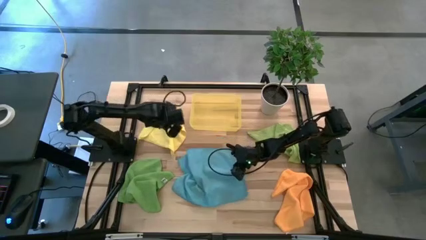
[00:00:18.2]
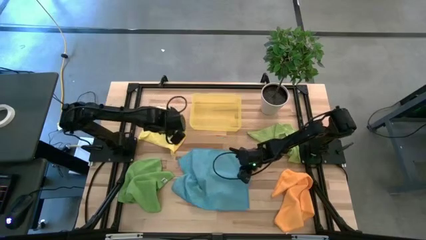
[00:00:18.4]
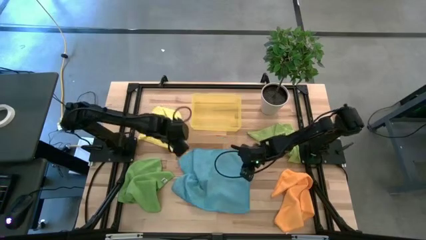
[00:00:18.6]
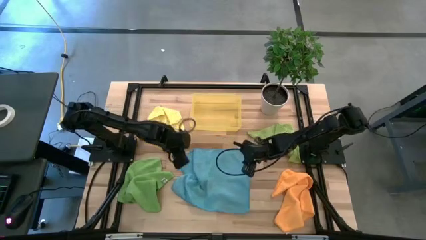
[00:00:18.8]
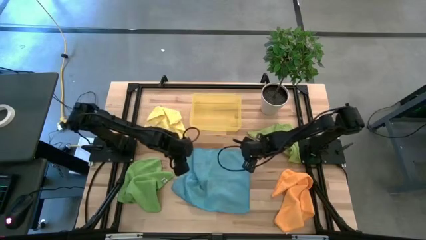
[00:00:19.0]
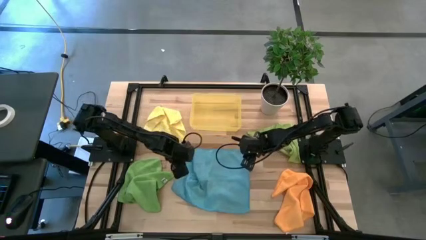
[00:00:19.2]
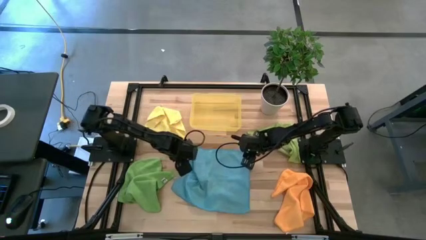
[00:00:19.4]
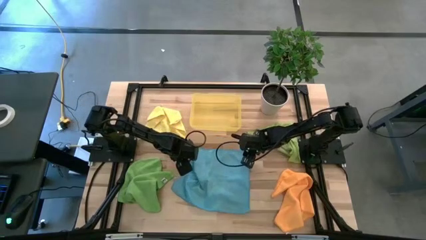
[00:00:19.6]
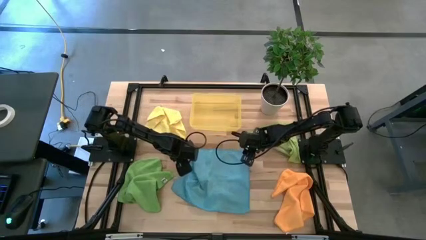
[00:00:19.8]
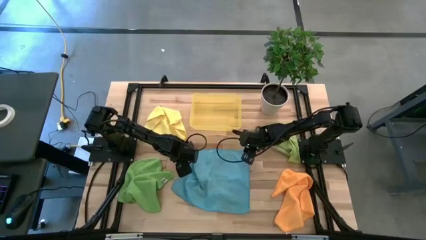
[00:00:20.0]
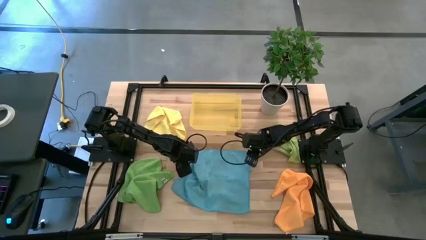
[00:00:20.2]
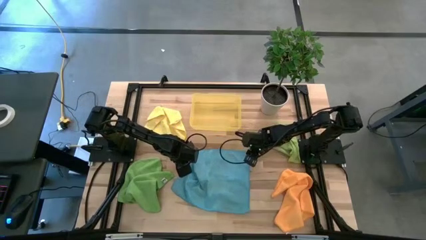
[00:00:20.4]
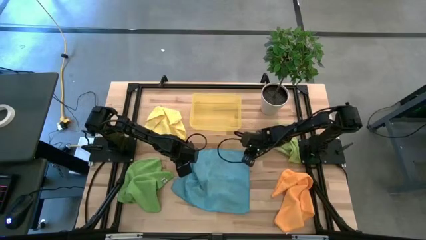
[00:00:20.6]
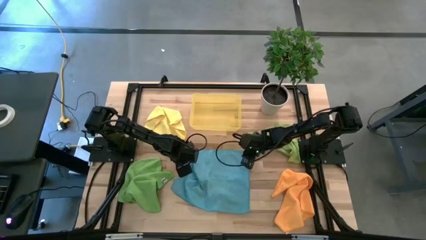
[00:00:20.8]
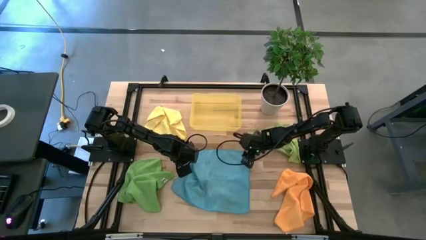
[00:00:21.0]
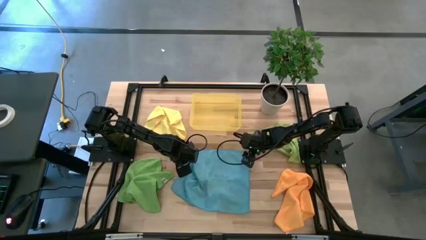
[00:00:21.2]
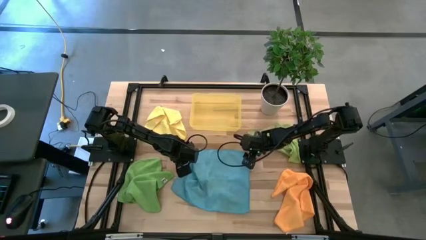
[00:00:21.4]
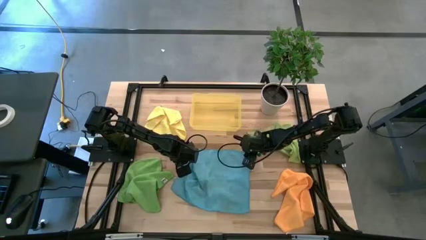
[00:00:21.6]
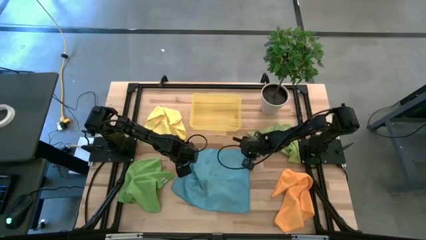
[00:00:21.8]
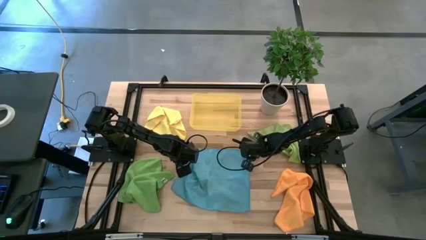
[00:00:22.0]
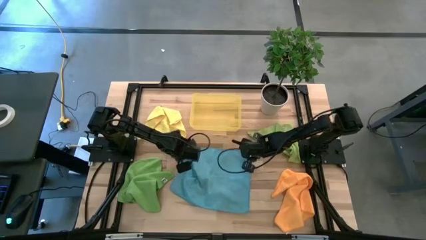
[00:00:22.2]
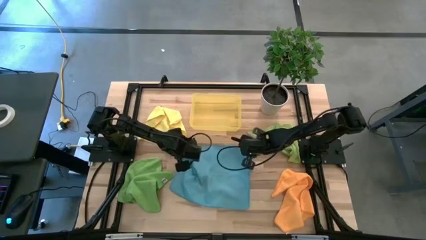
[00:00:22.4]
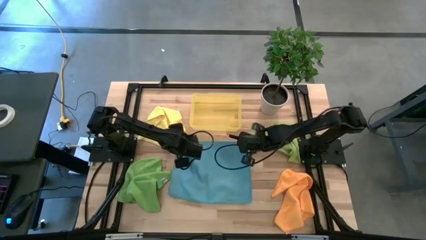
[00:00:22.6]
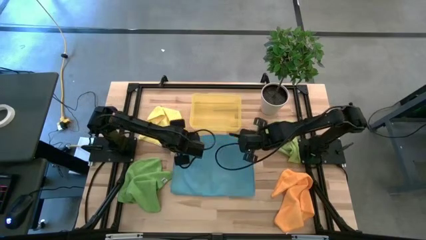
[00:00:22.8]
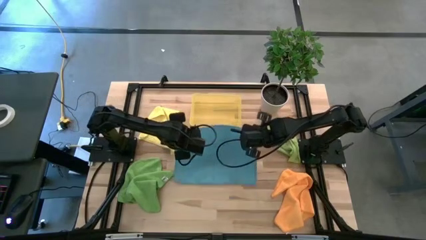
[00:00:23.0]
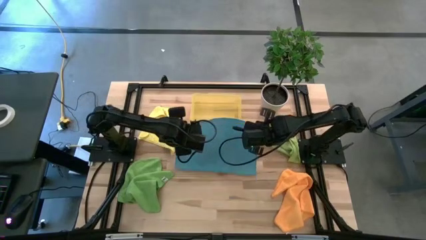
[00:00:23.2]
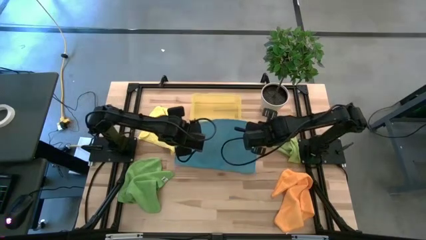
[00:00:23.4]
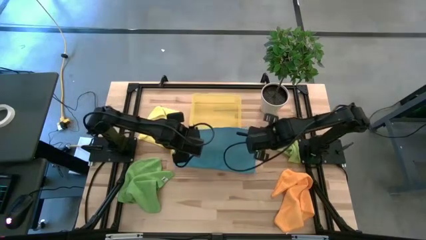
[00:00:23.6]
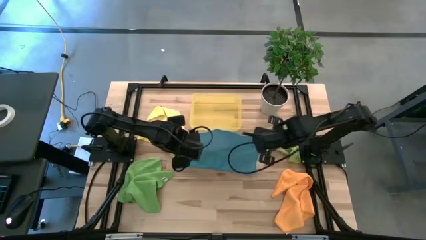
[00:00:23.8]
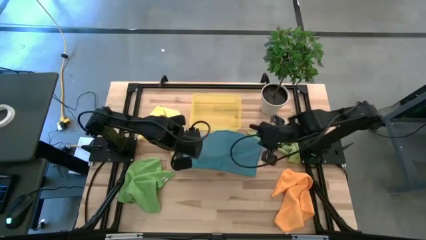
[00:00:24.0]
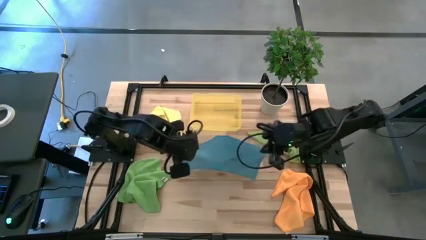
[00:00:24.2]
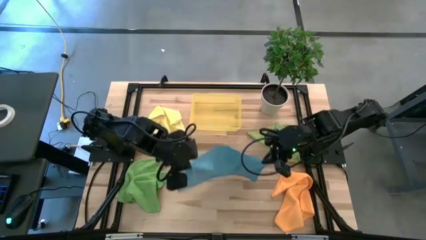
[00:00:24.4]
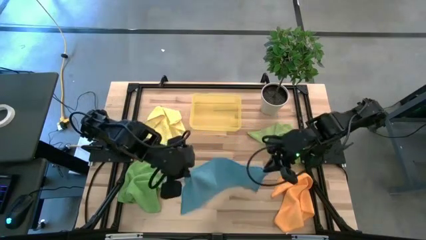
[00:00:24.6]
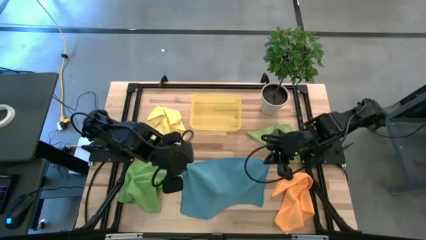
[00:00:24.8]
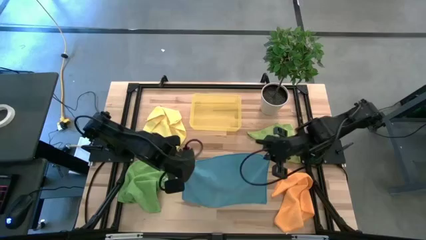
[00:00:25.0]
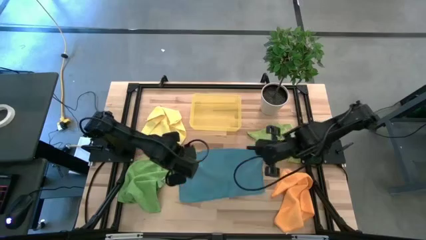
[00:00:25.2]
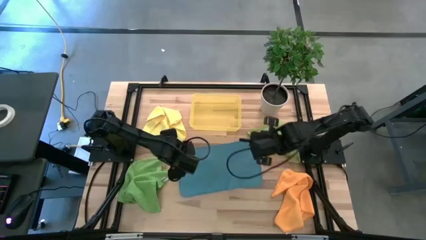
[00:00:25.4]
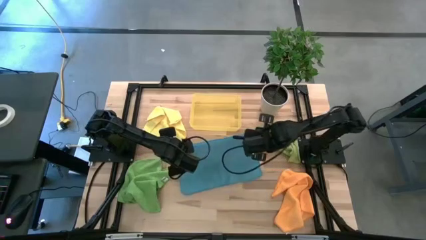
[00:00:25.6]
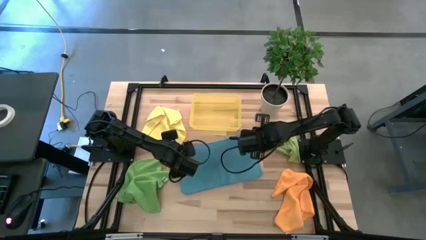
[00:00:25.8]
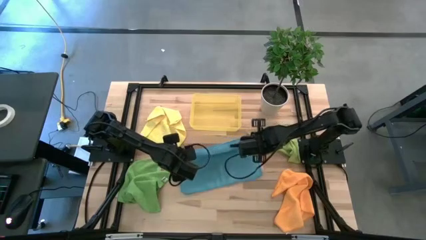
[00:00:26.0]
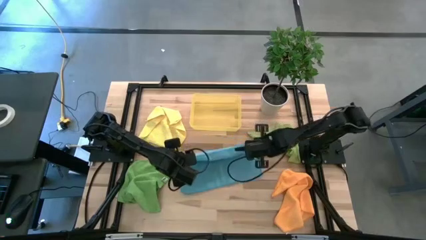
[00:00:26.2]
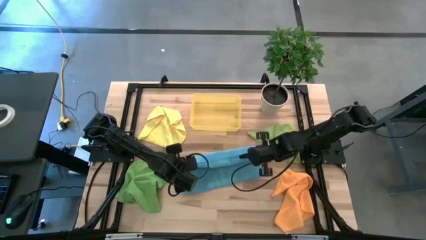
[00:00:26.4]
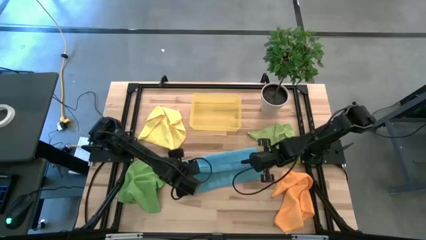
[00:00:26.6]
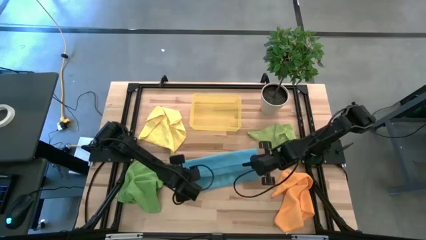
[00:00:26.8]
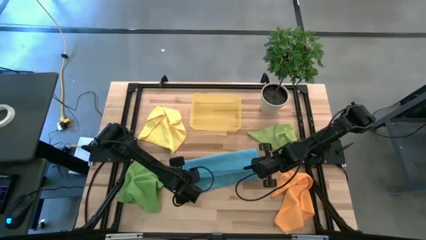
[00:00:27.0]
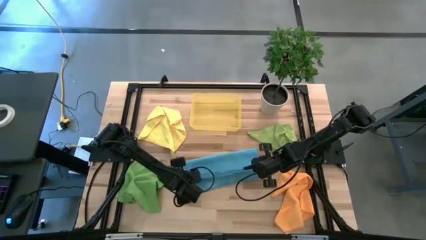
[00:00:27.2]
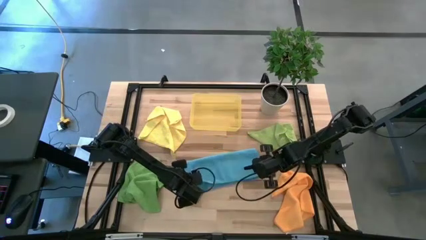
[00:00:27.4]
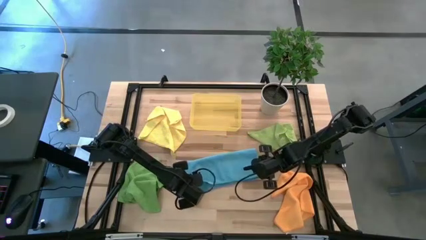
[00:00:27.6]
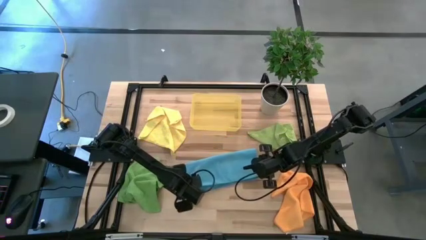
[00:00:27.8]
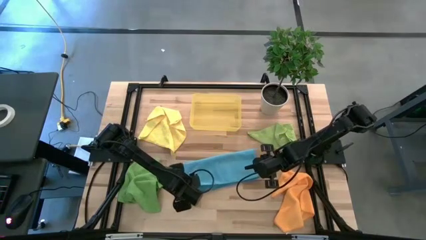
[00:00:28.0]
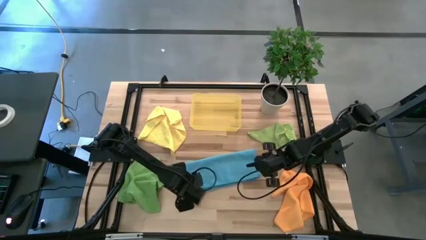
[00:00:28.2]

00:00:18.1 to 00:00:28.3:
Task: Fold microfiber towels
Fold the blue microfiber cloth
